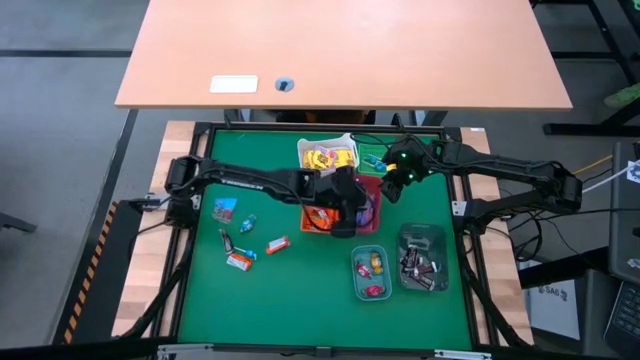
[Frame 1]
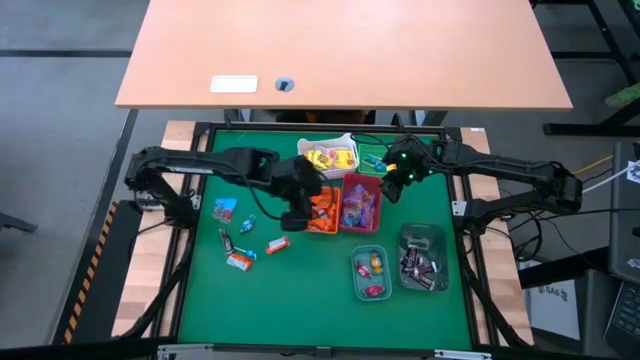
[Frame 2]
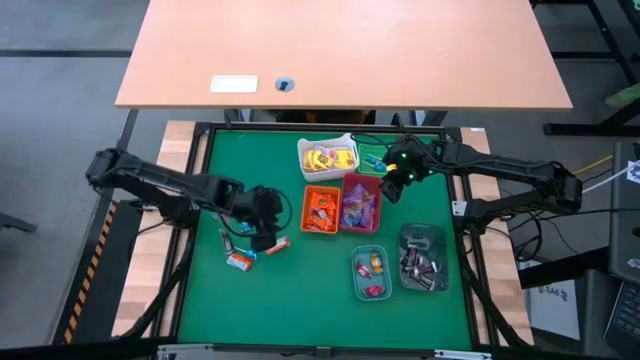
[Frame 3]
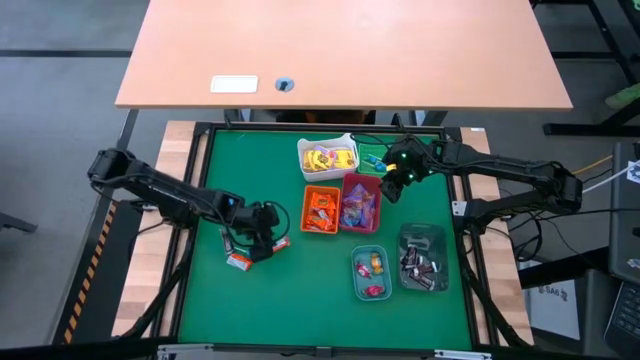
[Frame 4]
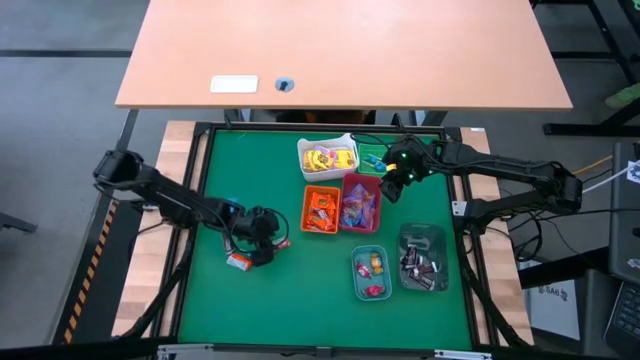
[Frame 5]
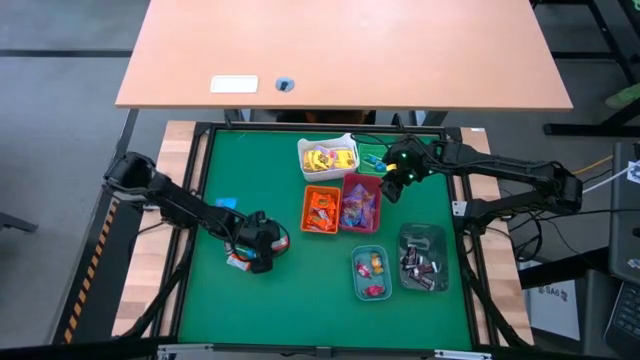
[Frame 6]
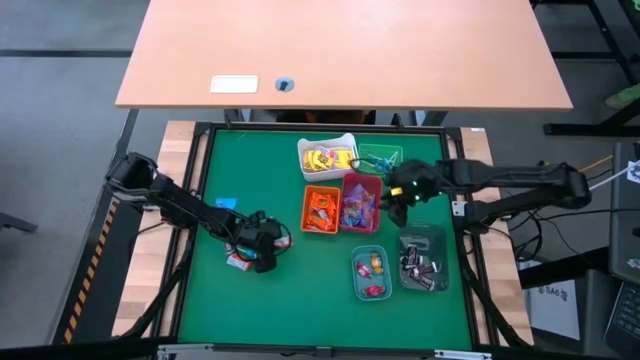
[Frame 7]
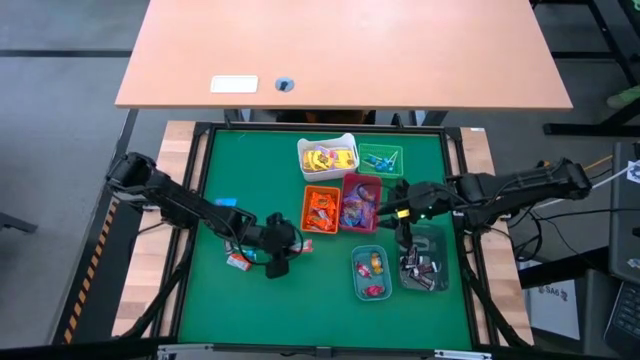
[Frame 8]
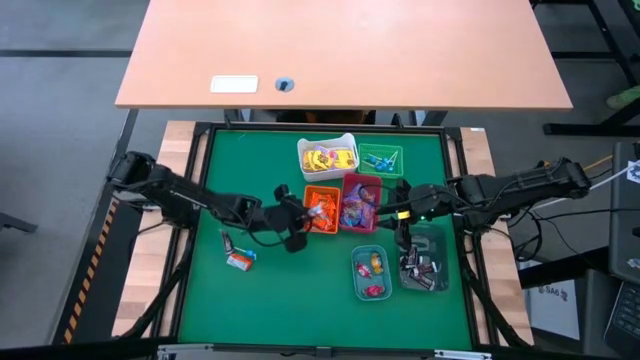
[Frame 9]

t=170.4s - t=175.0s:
Task: Sort candy
Put the orange chocolate into the orange basket

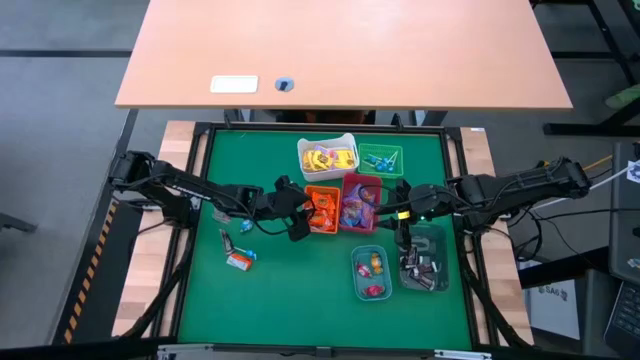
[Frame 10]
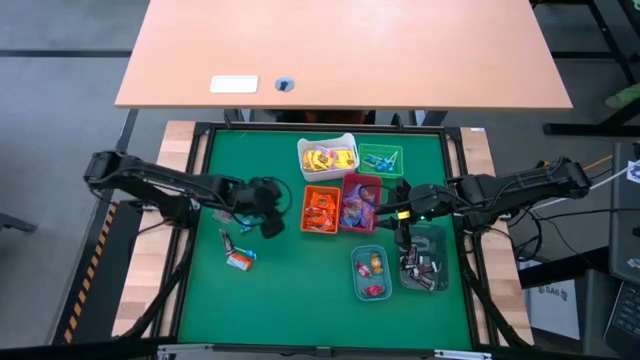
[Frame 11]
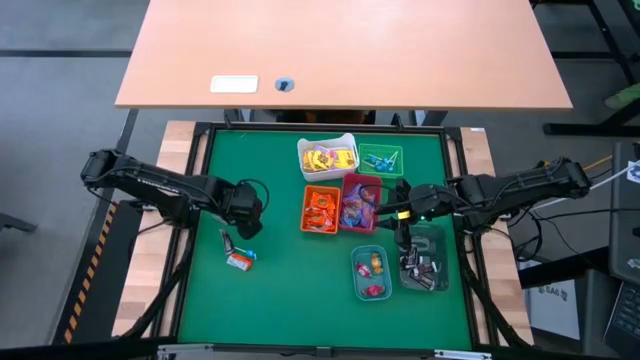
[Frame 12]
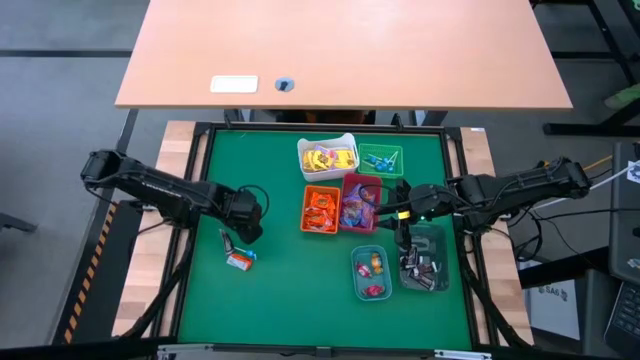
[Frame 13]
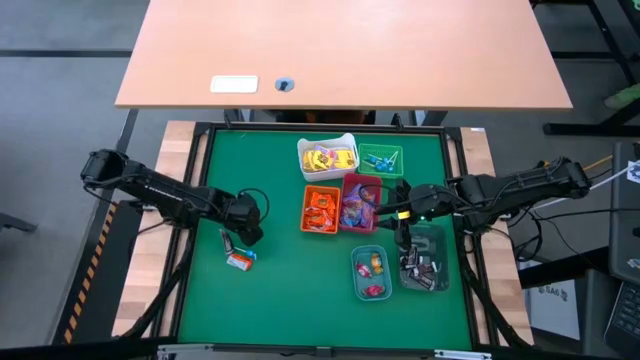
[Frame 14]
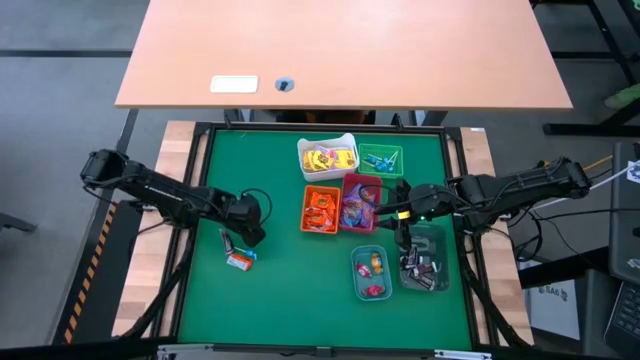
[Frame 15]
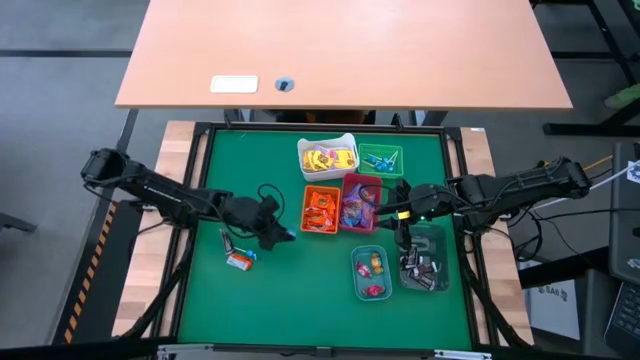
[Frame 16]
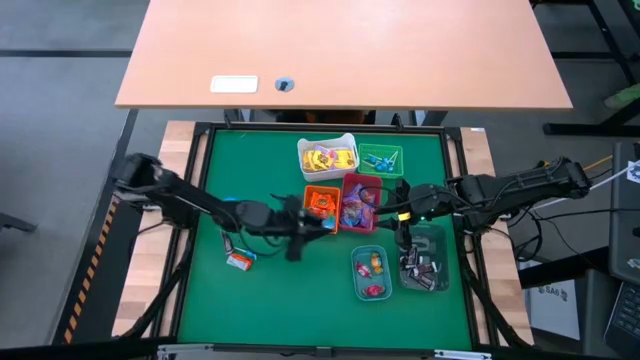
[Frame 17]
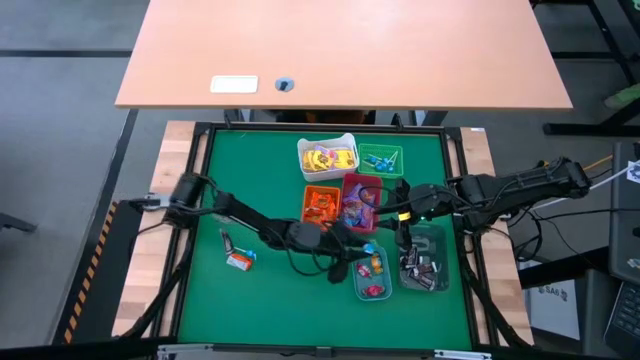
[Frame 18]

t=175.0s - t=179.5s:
Put the blue candy into the blue bin

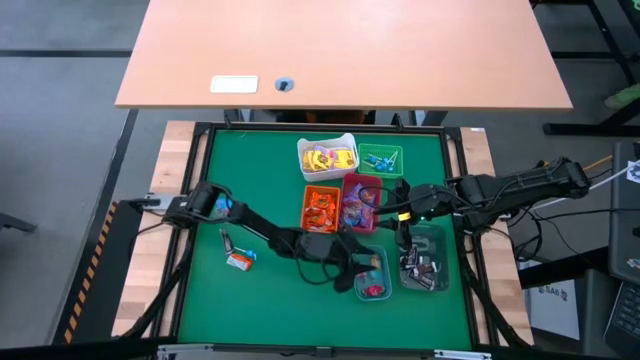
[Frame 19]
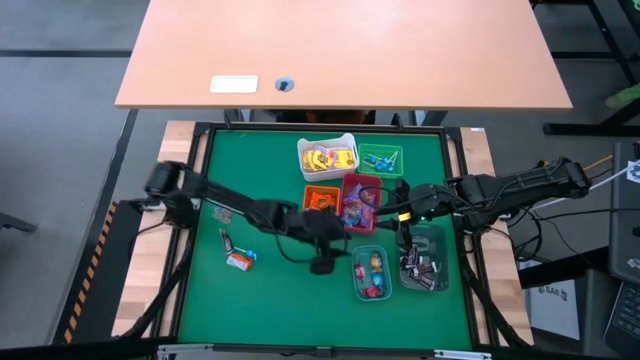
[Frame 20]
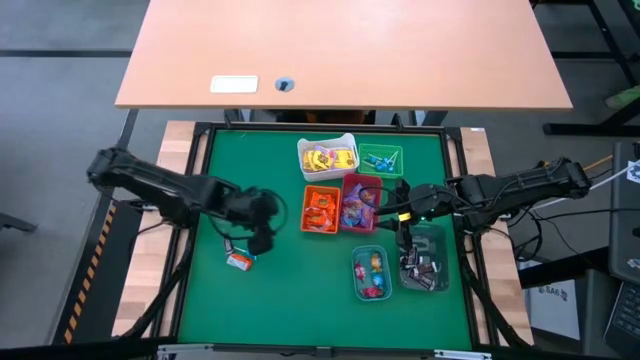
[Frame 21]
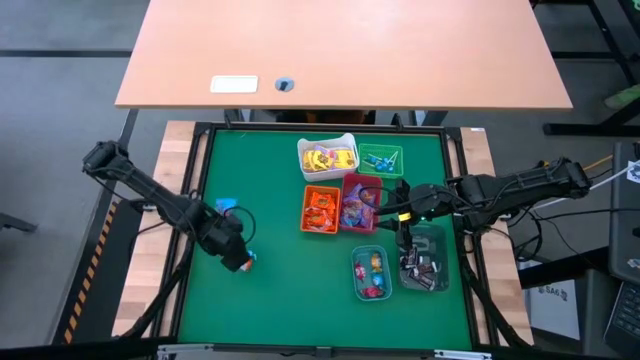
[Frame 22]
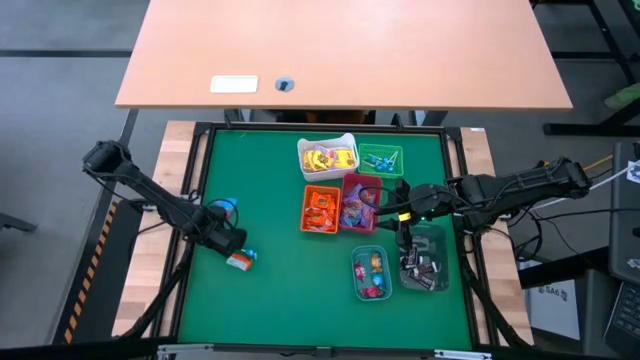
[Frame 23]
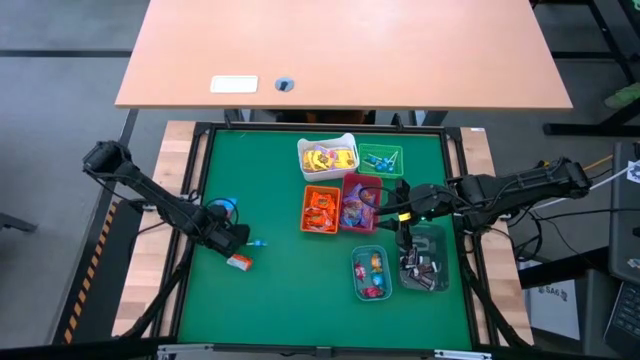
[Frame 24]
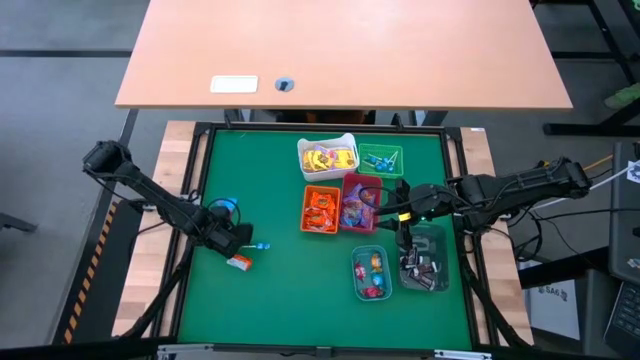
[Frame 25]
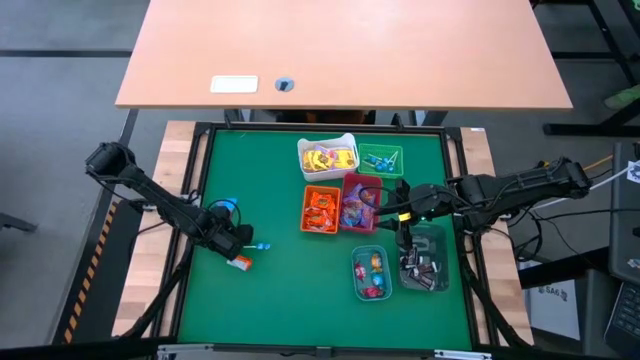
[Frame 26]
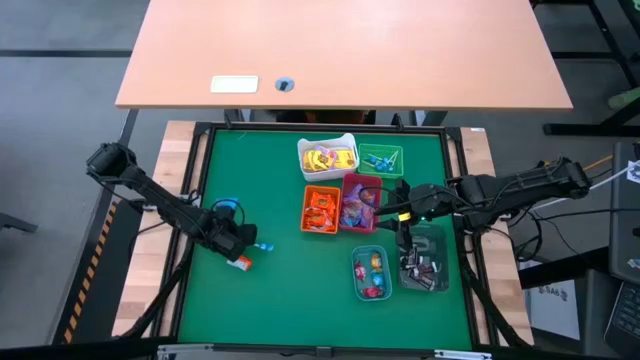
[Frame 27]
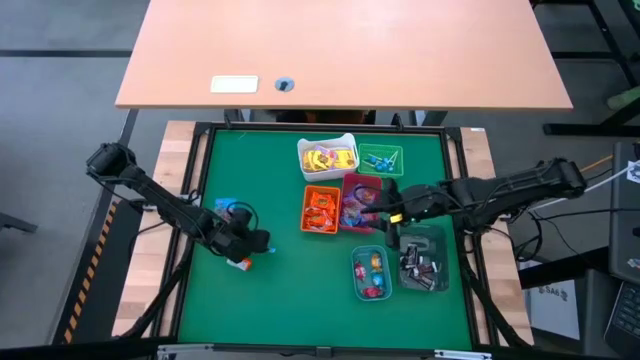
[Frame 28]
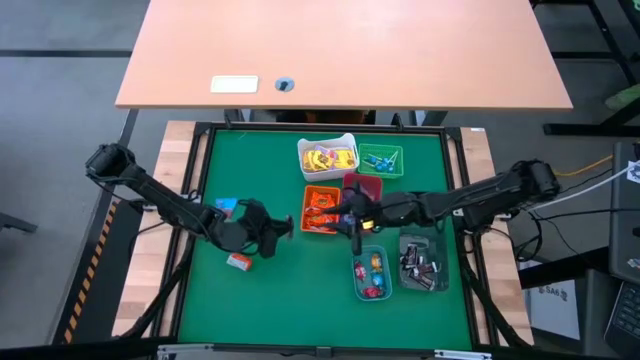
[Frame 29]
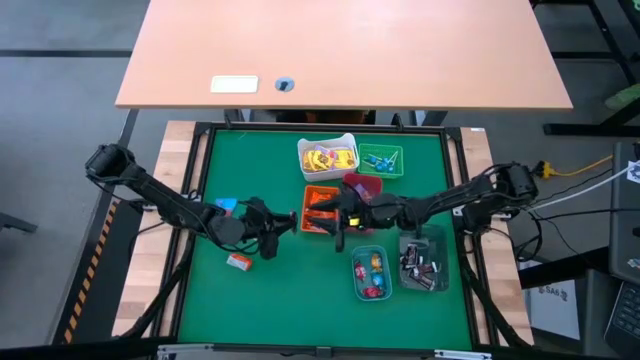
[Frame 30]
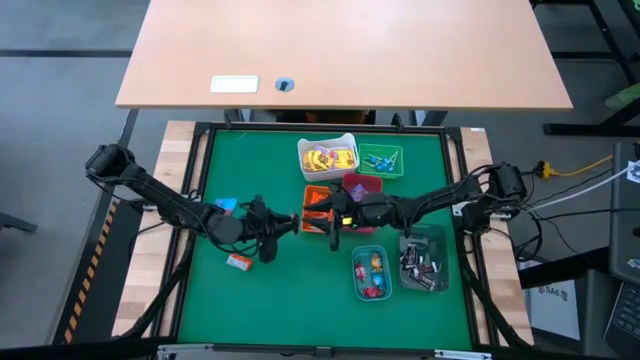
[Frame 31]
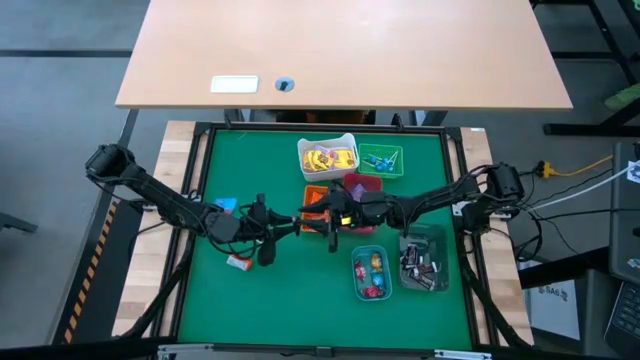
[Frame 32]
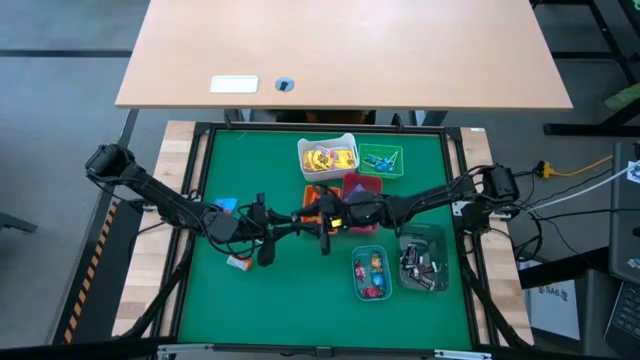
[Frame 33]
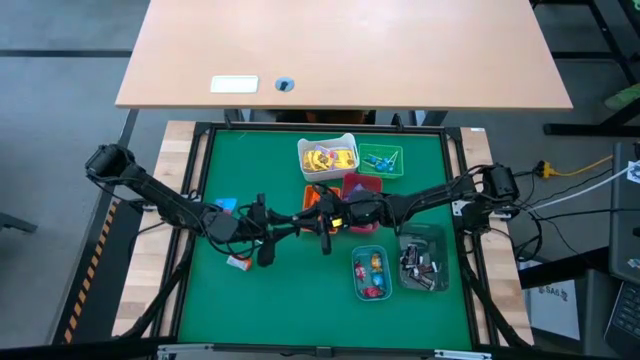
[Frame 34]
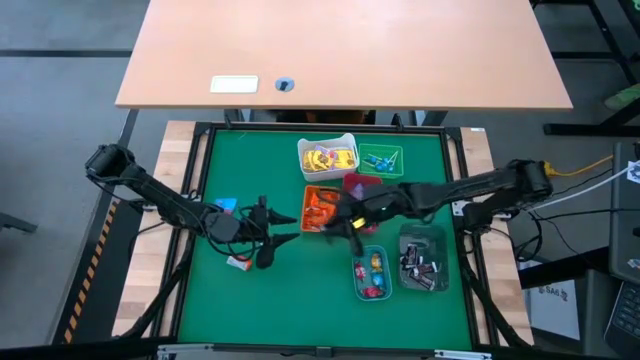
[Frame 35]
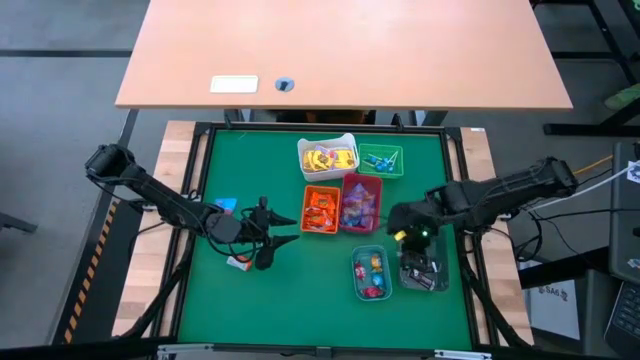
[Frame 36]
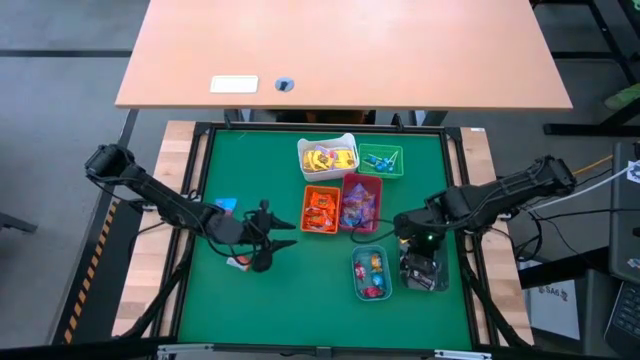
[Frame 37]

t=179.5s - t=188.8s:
Put the brown chocolate into the gray bin

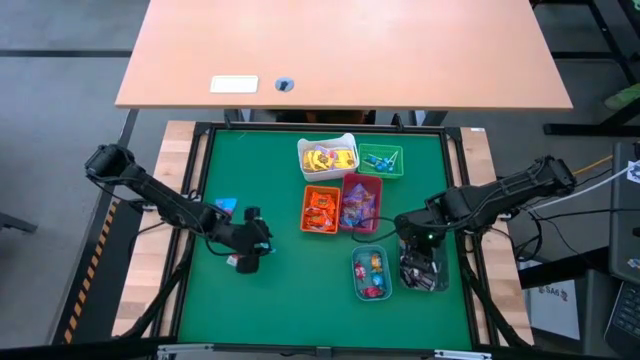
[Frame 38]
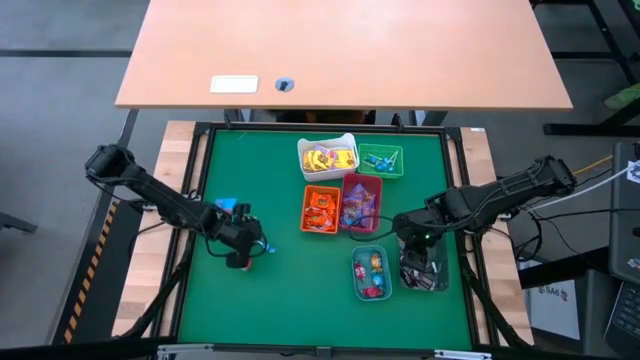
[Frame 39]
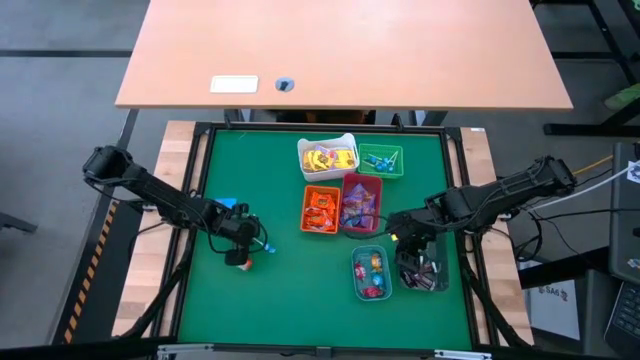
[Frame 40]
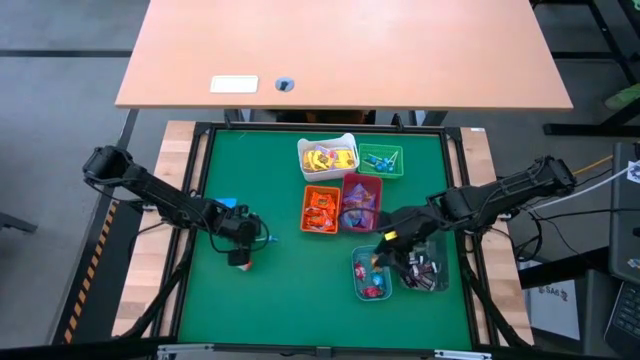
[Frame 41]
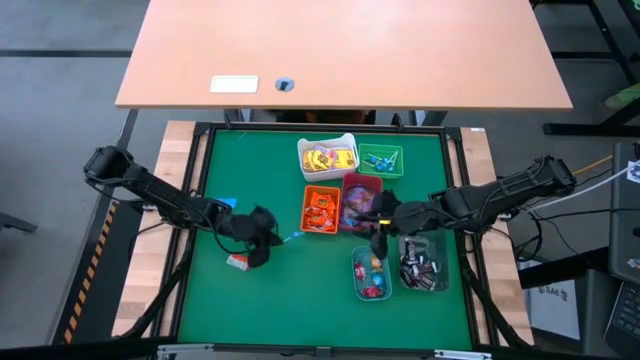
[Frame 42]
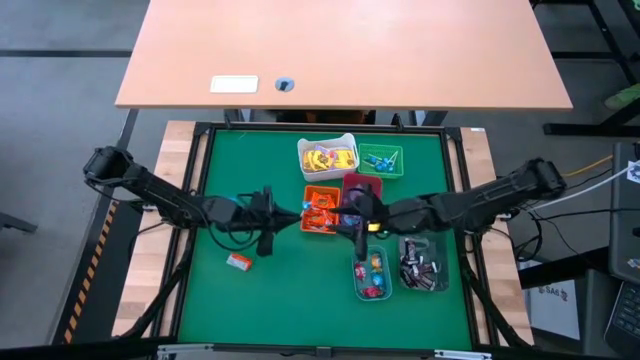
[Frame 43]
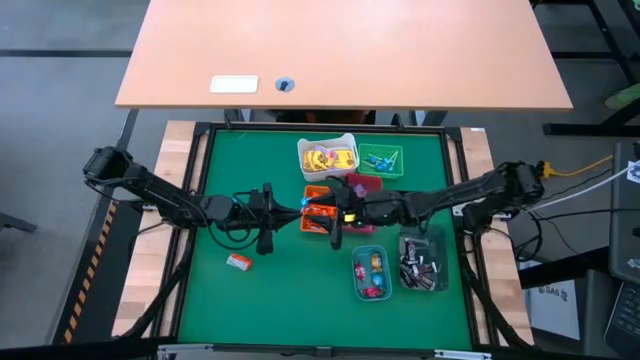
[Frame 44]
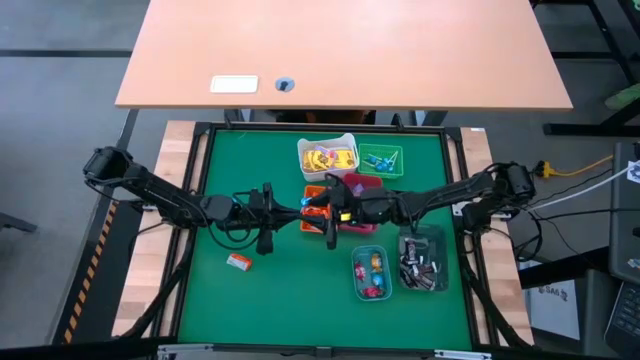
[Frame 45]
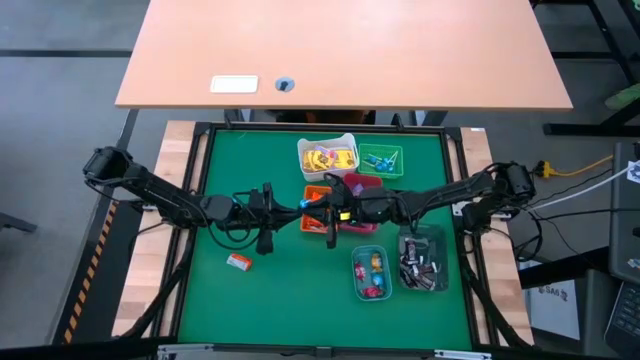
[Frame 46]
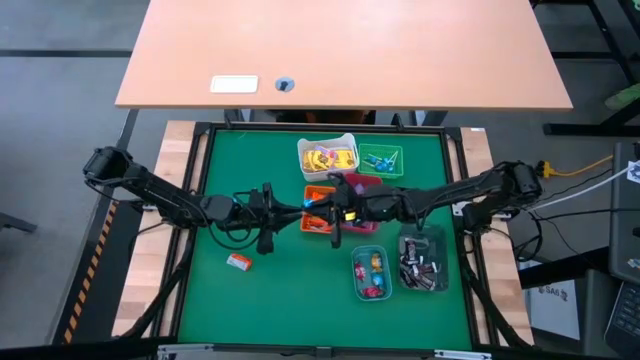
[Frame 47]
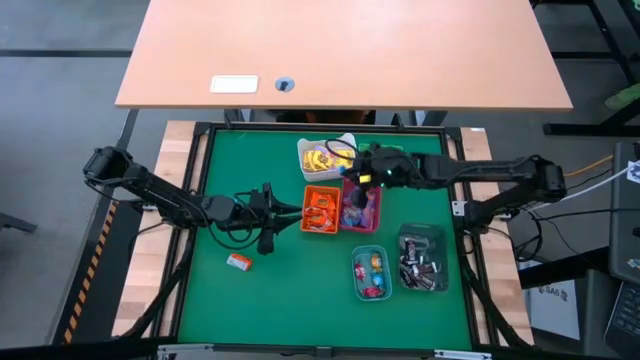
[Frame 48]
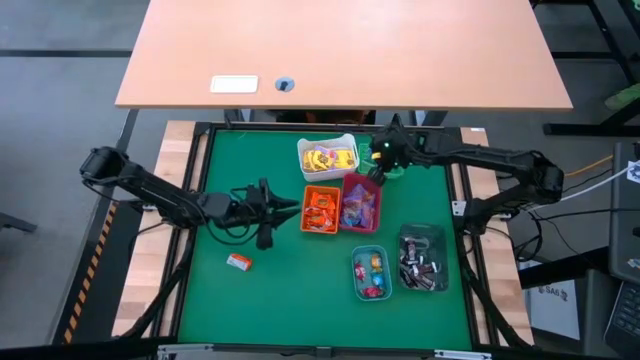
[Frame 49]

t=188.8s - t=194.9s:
Put the blue lollipop into the green basket
